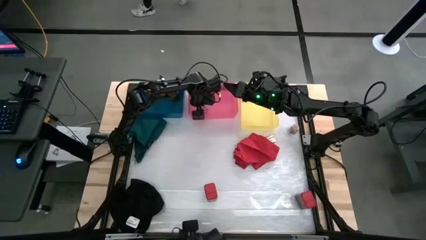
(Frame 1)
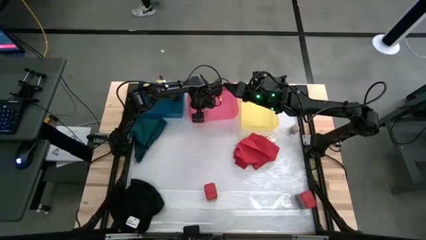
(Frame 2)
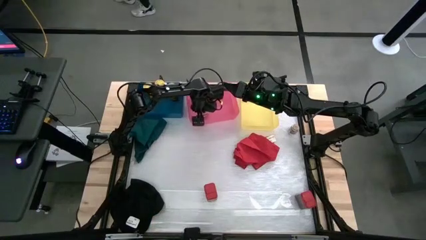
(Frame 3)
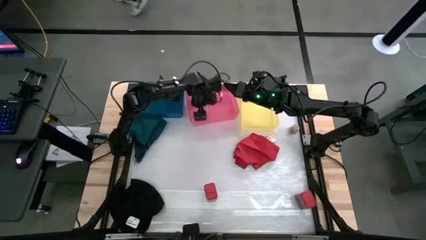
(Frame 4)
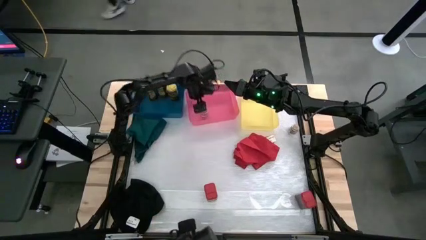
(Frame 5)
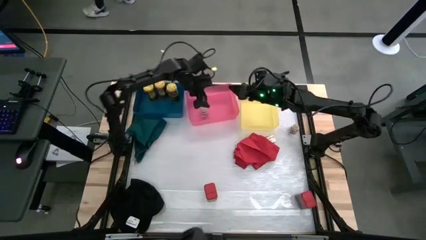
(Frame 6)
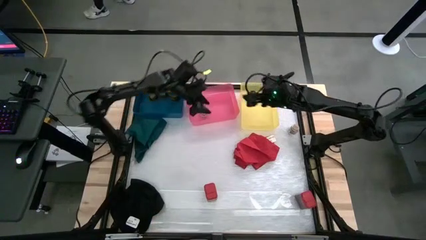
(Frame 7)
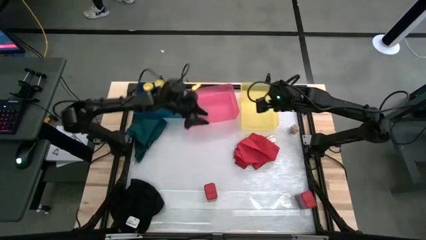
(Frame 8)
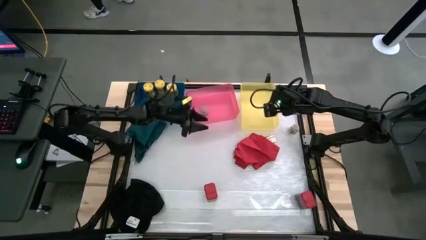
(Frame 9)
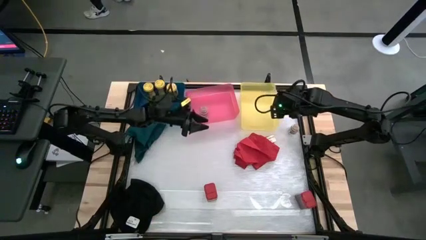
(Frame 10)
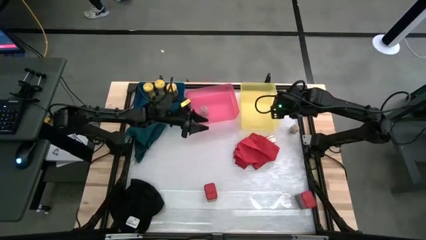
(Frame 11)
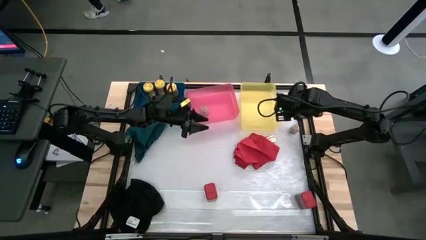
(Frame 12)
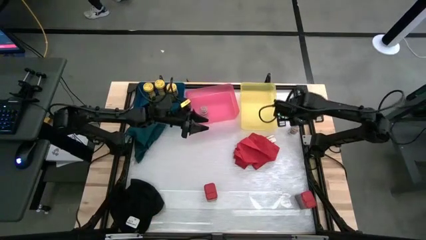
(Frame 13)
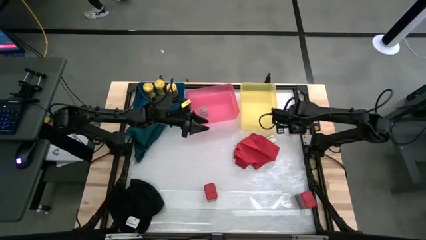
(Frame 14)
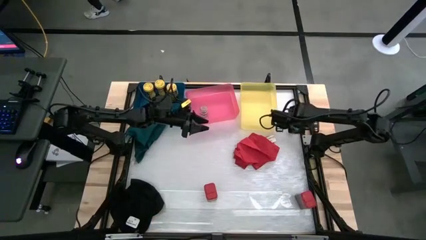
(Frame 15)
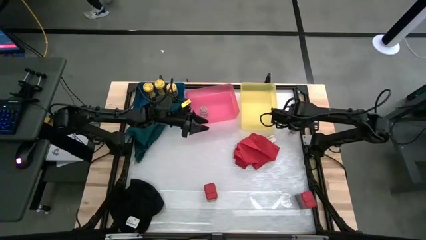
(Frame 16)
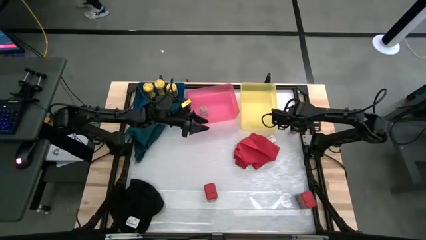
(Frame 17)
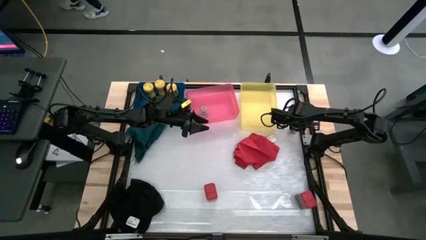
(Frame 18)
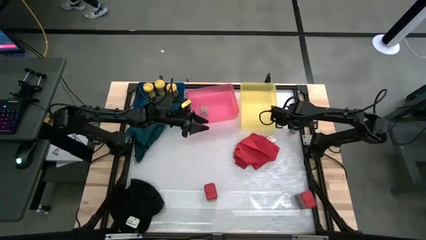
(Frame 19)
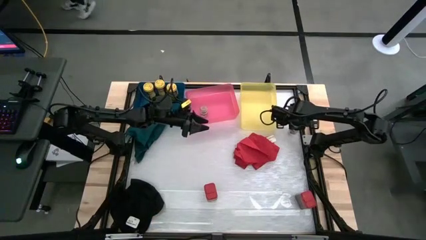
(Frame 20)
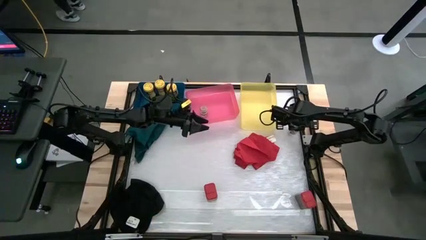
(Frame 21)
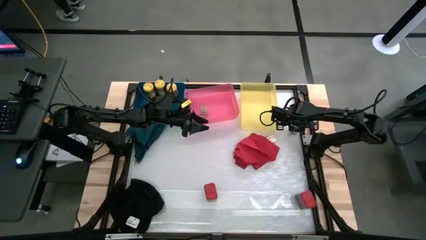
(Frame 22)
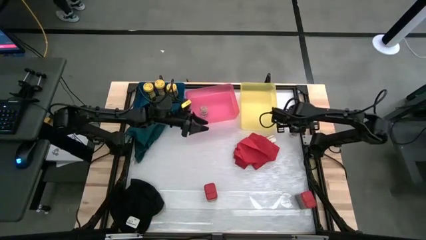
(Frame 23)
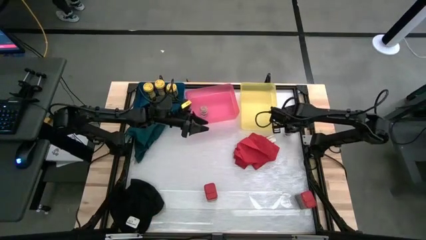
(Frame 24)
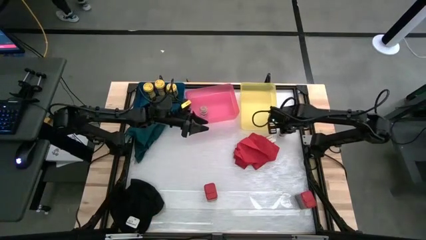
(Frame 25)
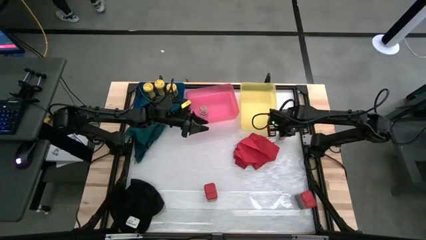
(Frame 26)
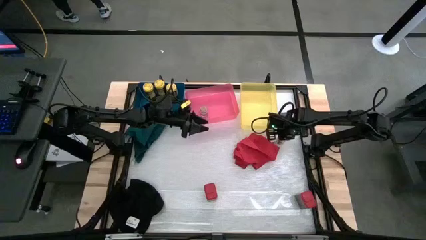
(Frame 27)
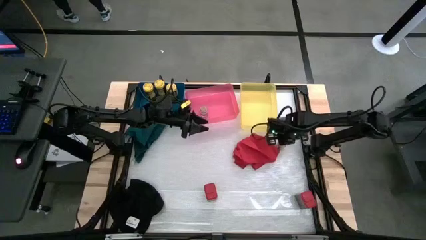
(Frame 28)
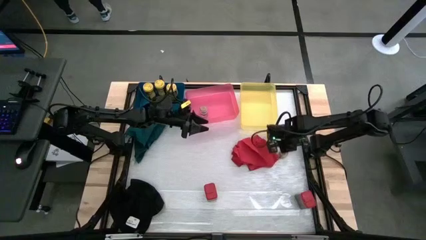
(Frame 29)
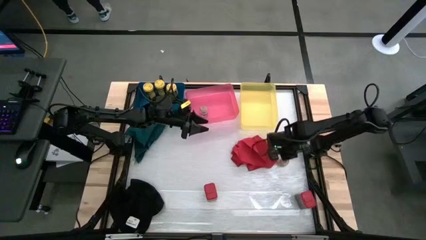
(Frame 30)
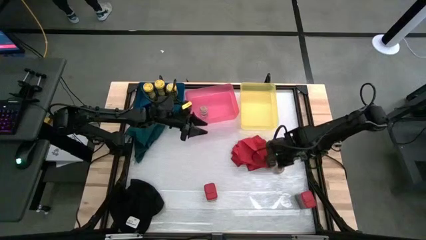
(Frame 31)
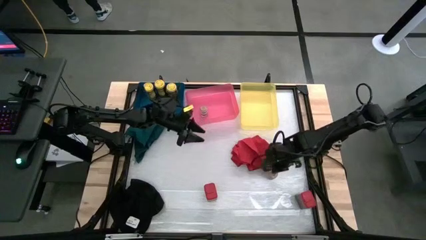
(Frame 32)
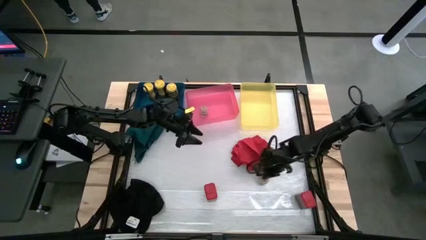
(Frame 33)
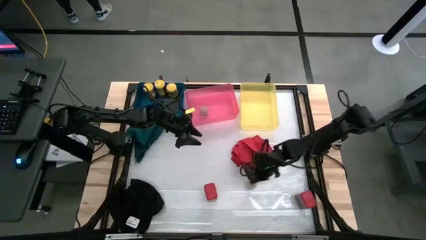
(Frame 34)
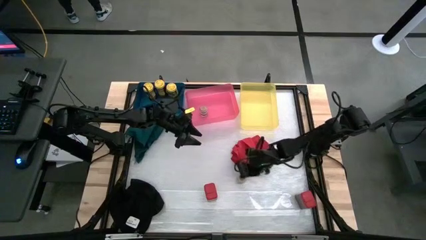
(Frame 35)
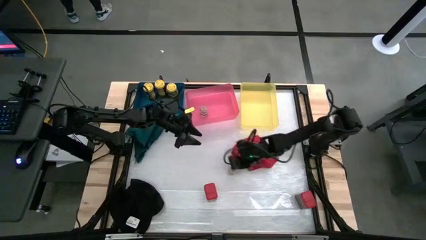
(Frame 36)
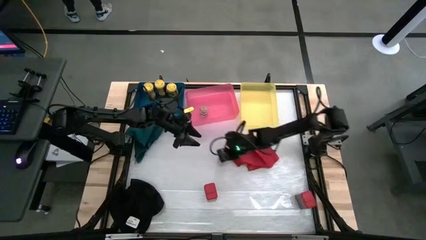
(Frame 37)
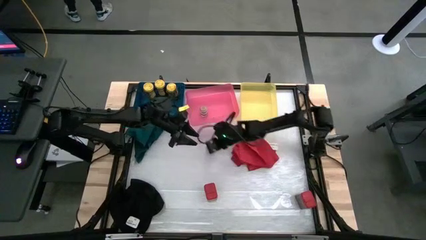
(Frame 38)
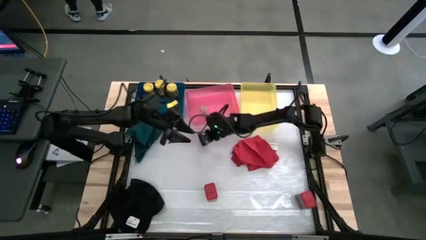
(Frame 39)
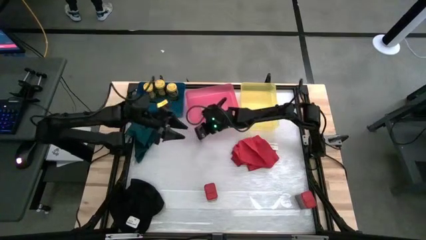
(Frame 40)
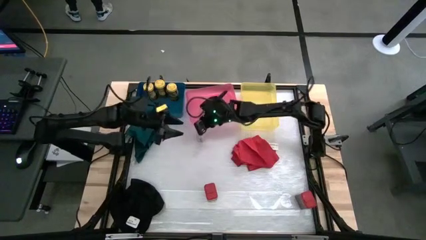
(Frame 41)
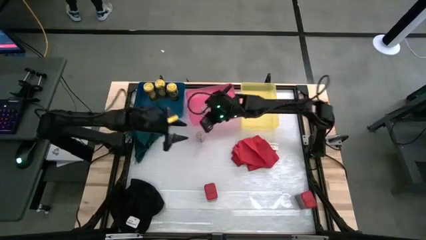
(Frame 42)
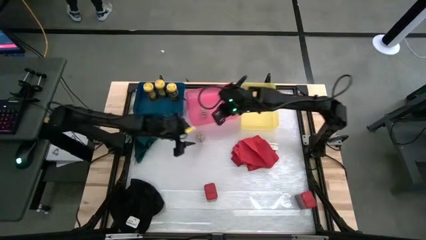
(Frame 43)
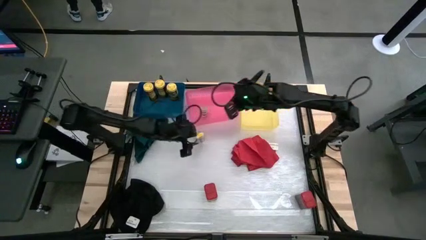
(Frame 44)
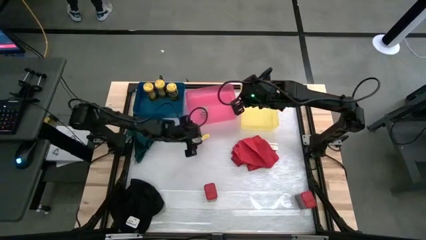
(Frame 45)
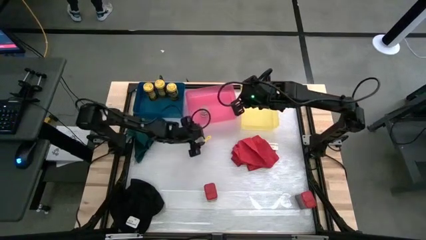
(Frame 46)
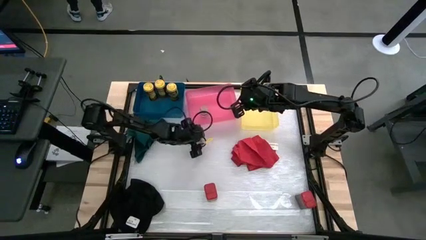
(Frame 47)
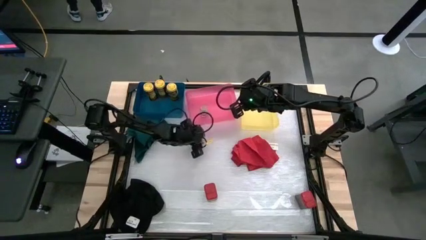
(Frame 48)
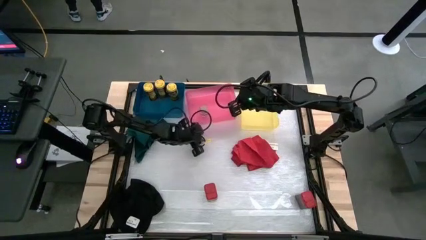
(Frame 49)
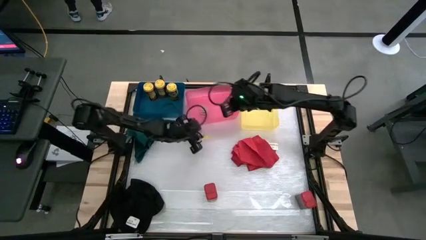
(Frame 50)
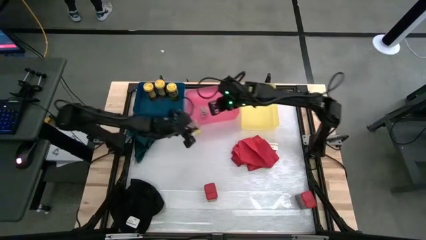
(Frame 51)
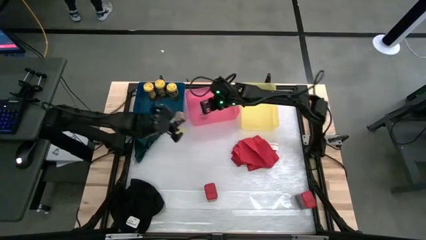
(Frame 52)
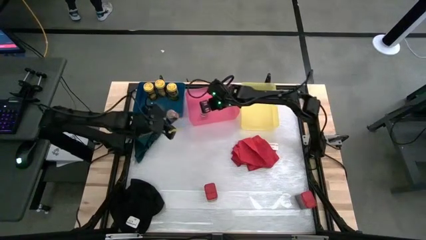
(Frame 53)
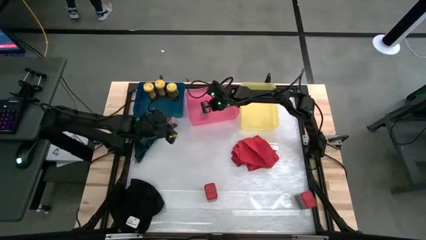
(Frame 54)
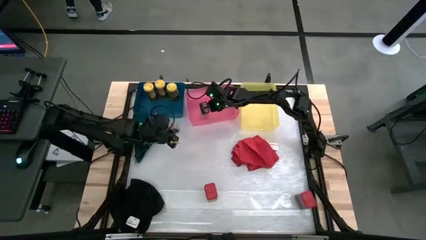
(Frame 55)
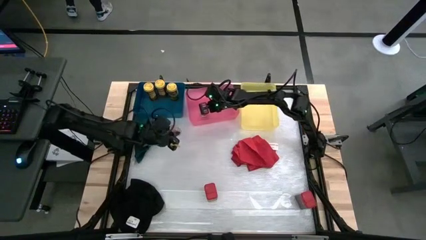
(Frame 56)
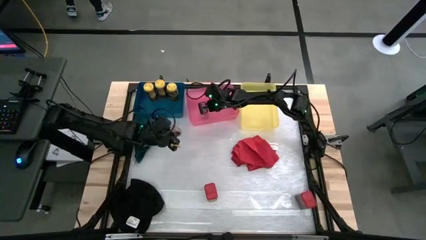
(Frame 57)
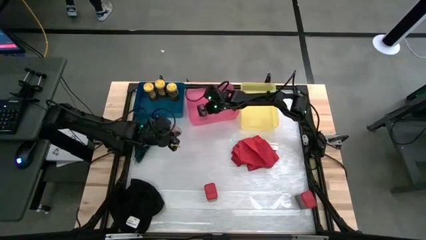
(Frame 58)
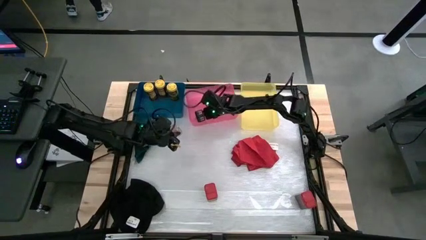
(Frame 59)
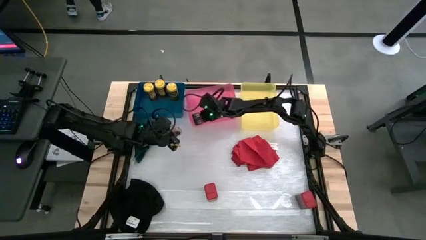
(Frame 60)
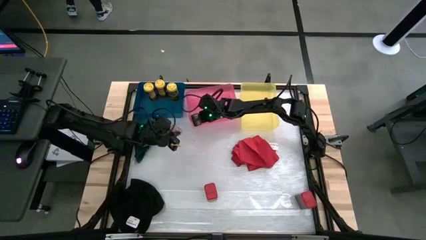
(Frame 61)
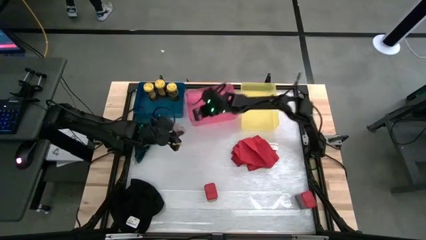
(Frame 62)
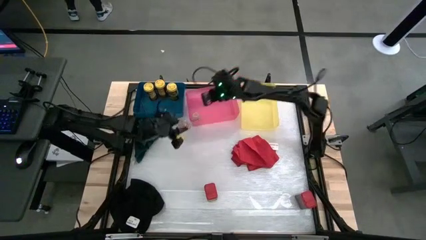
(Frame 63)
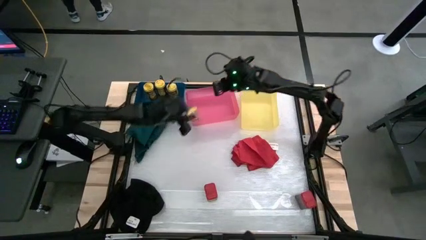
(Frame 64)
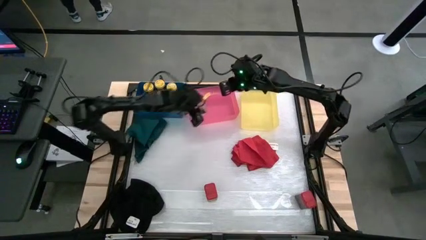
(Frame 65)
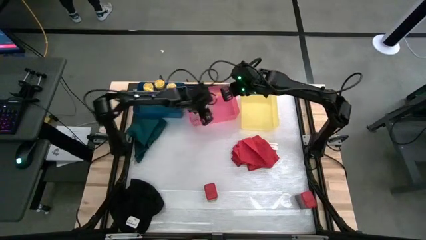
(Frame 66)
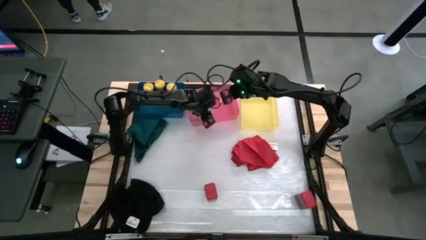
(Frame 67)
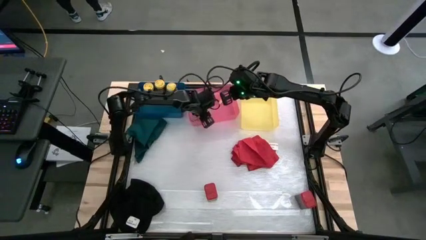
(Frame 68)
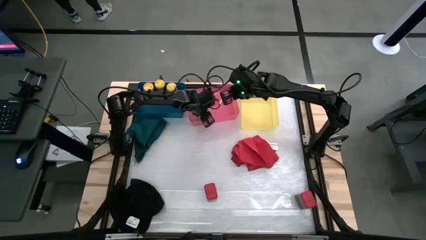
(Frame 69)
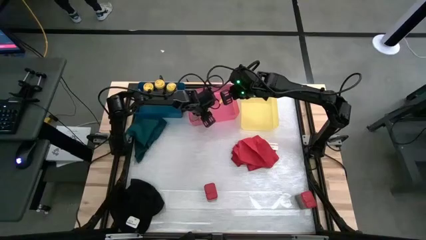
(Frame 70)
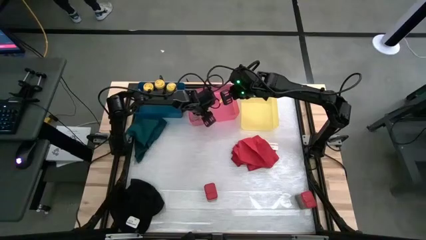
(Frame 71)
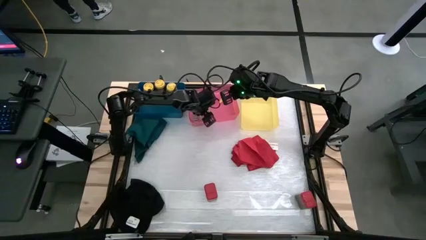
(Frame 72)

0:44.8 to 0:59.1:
Task: Sort spices by type
Put the brown seasoning bottle into the pink bin
